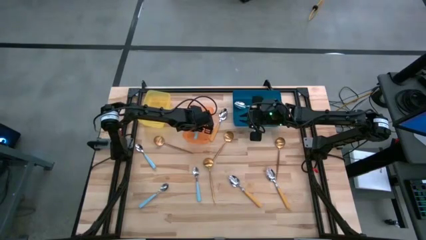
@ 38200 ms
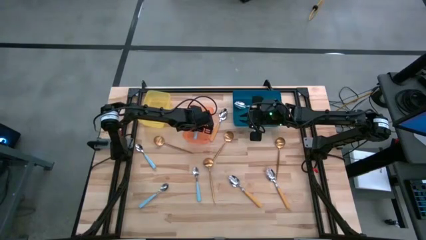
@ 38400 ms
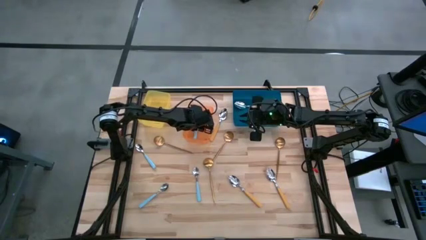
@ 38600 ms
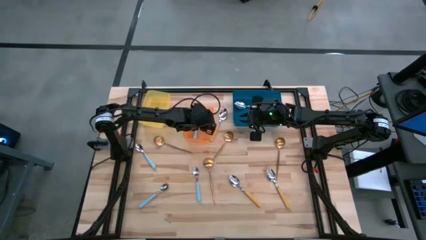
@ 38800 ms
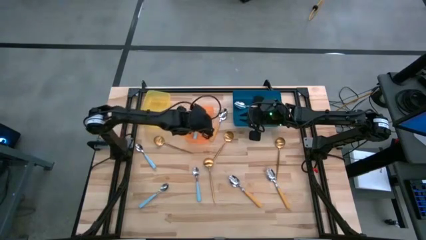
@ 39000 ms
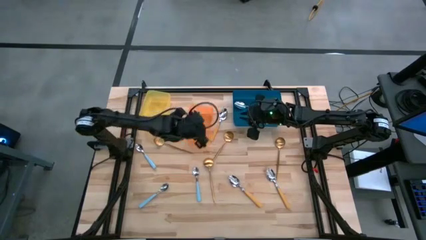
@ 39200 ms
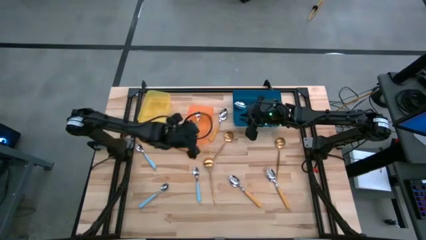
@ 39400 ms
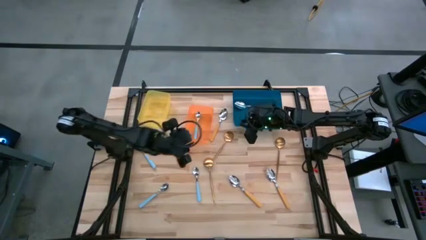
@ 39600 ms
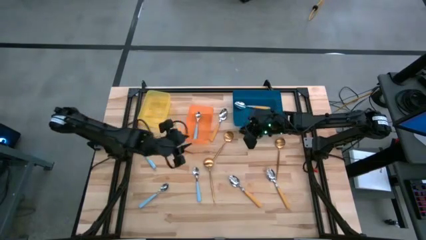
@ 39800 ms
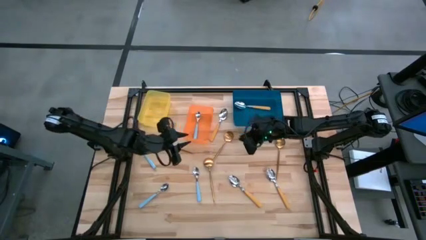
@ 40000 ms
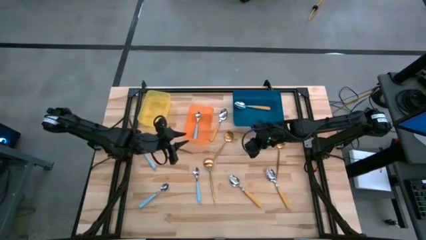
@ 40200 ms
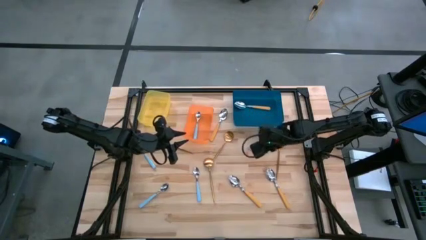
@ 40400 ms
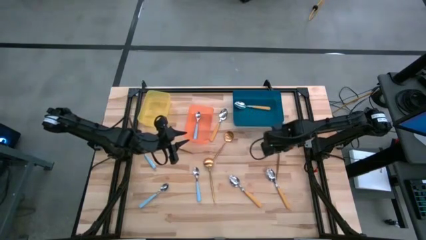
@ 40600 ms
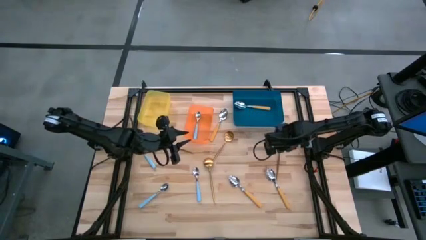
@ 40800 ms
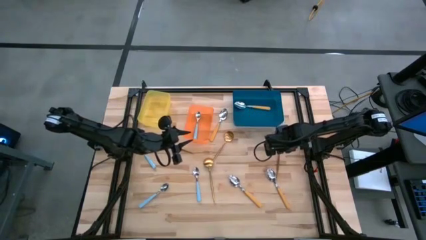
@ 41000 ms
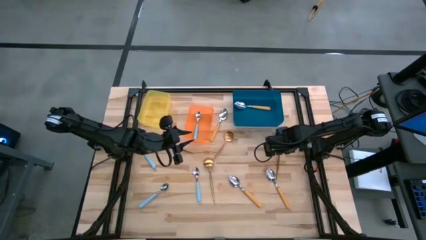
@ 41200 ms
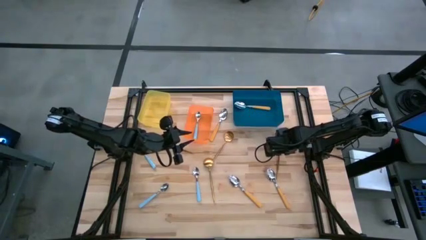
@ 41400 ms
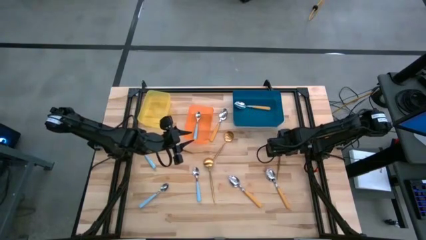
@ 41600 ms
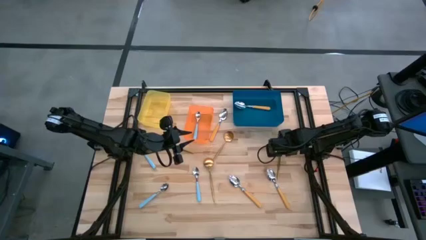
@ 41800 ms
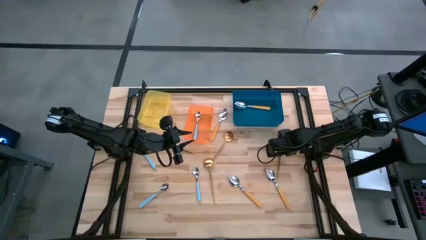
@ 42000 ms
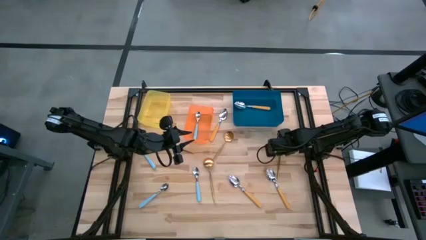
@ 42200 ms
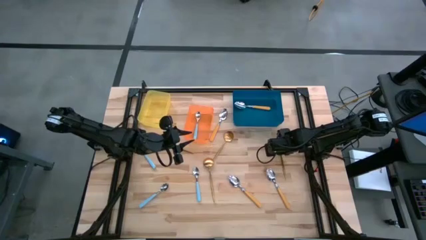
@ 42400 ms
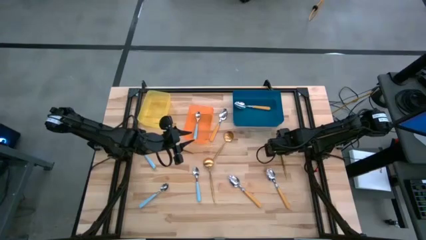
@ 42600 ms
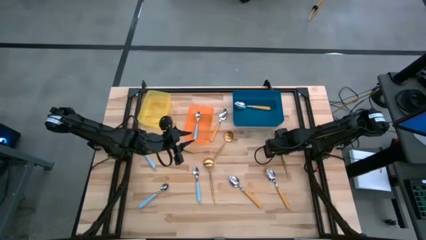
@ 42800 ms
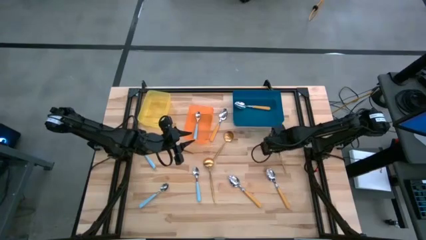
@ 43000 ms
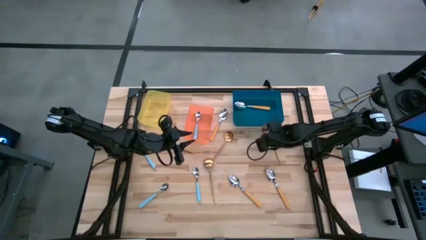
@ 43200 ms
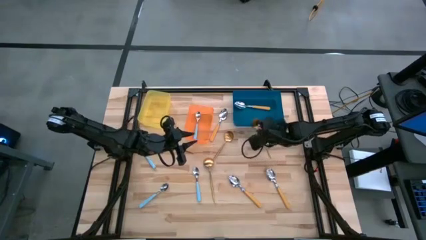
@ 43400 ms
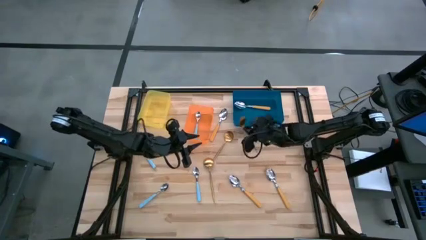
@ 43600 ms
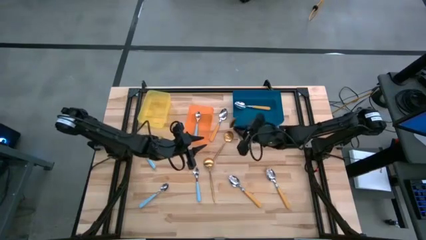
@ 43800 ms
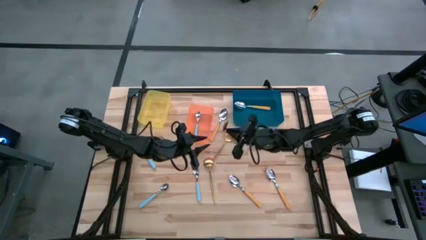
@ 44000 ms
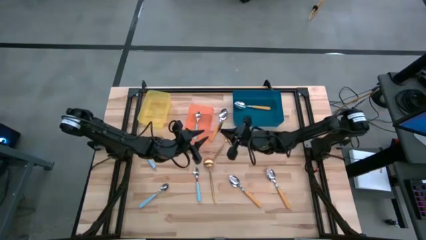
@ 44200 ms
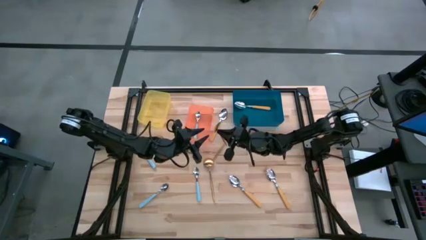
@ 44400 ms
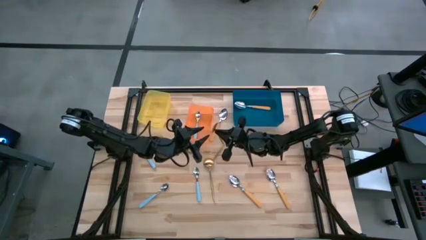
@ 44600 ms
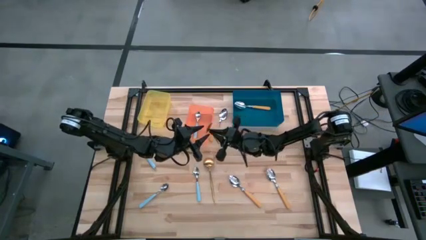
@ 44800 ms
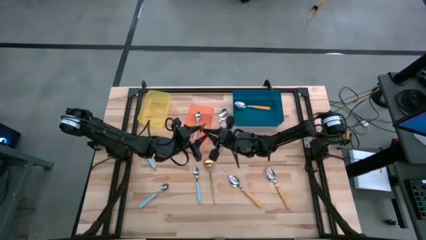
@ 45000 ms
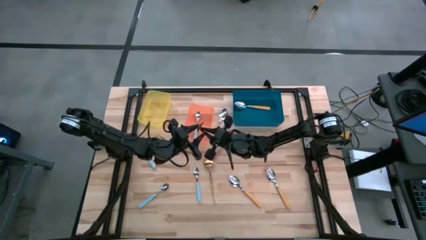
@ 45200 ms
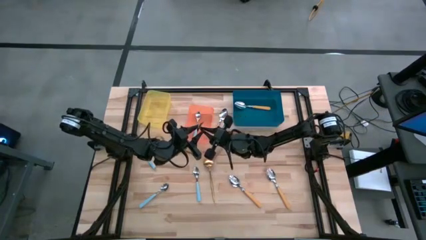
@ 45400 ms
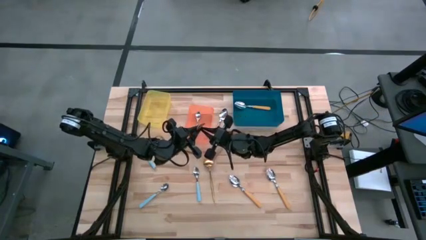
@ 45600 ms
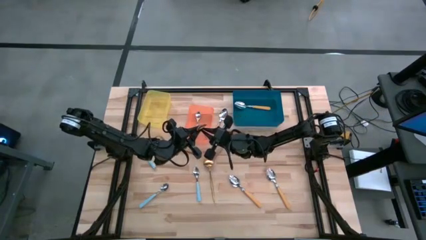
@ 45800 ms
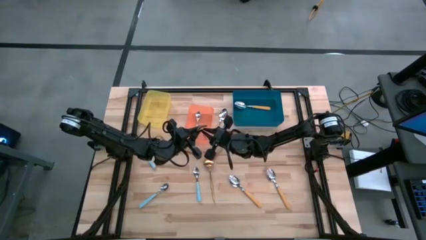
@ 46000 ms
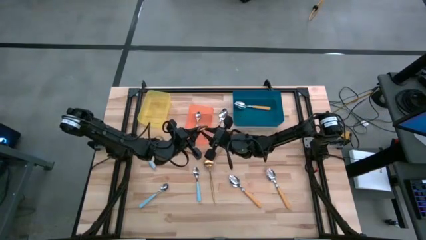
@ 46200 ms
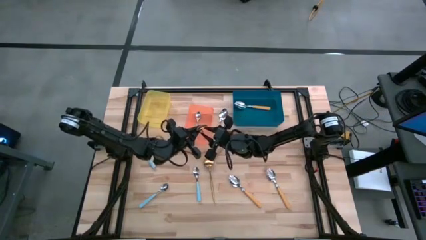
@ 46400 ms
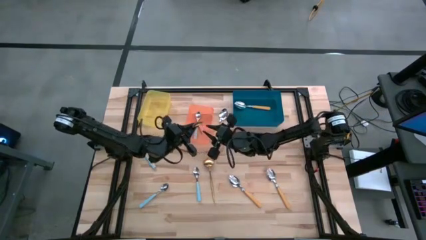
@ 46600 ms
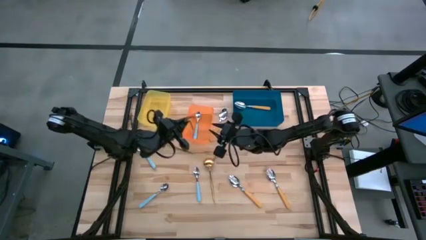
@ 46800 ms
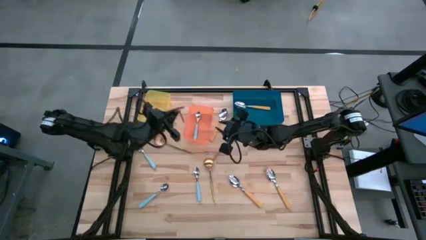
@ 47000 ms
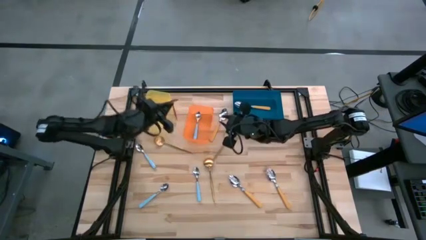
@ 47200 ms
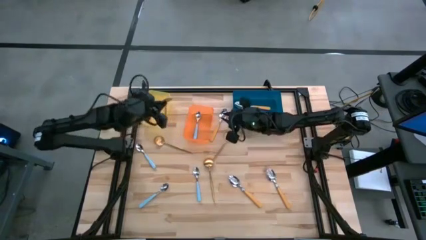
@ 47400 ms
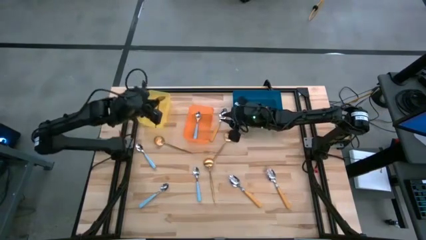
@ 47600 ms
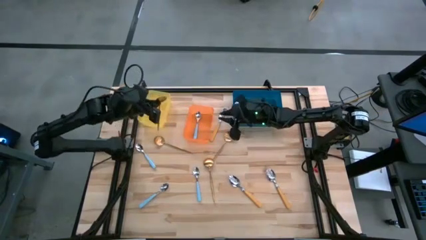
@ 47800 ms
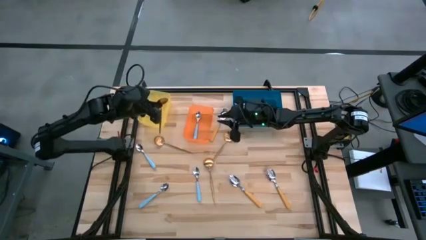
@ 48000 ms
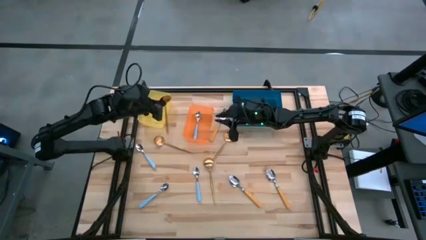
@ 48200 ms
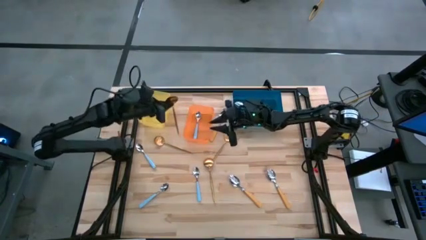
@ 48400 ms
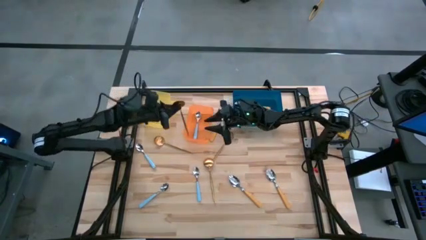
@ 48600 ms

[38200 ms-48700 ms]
Task: Sort silverware by color (type)
Put the gold spoon into the yellow bin
